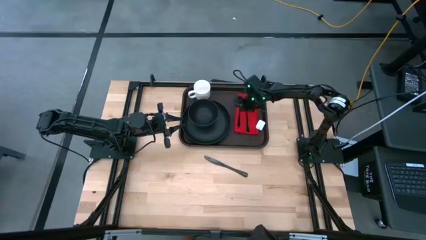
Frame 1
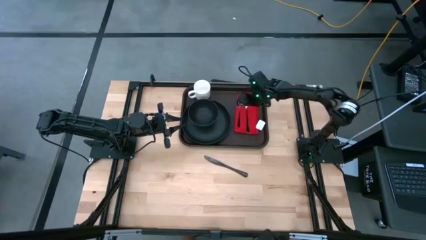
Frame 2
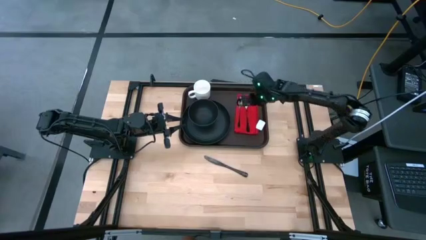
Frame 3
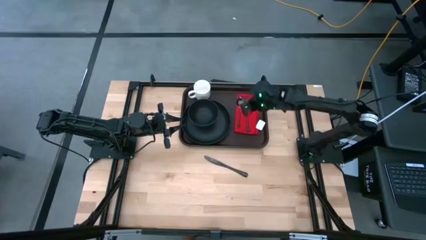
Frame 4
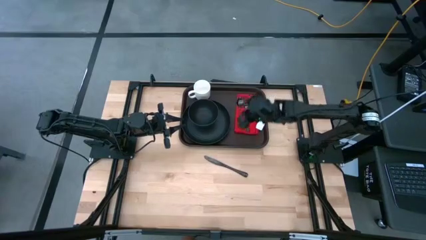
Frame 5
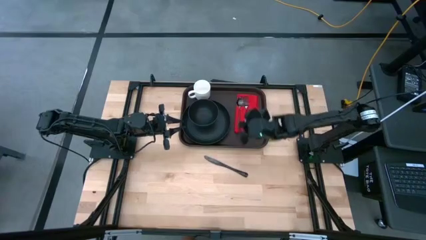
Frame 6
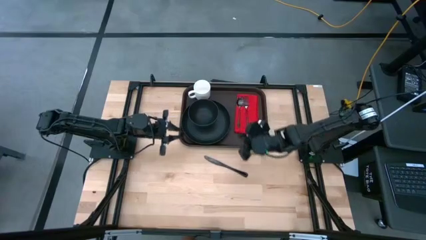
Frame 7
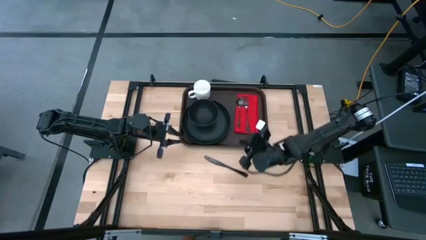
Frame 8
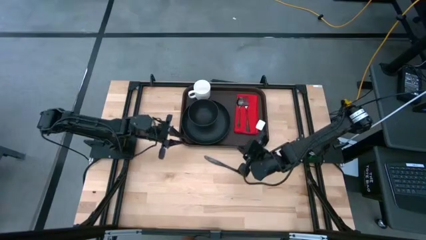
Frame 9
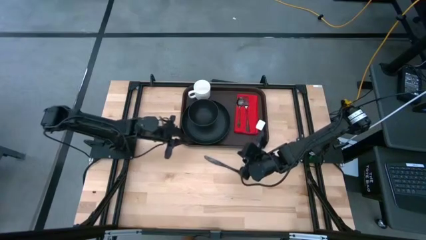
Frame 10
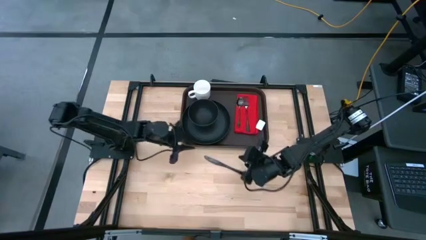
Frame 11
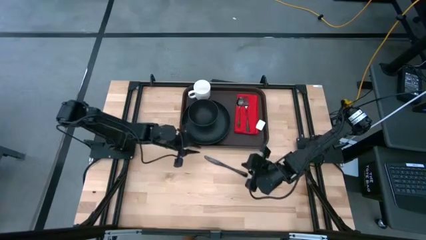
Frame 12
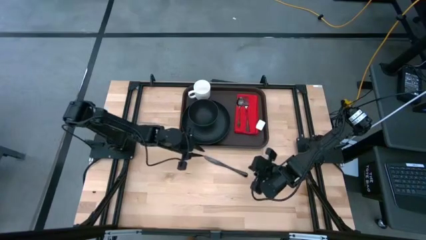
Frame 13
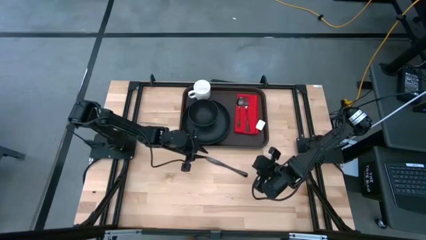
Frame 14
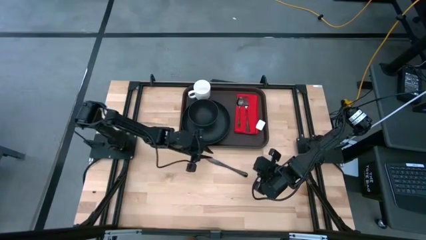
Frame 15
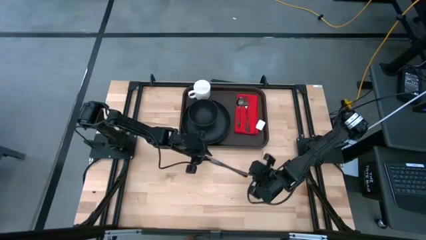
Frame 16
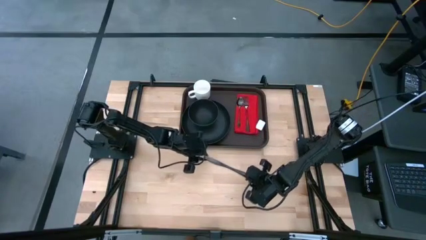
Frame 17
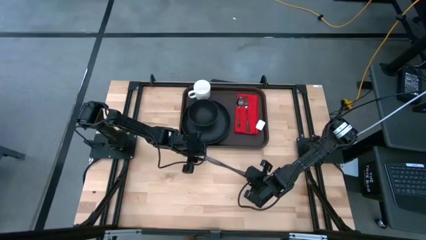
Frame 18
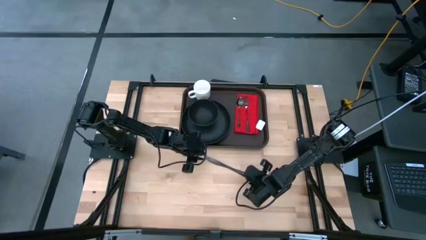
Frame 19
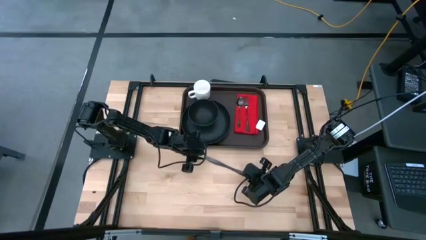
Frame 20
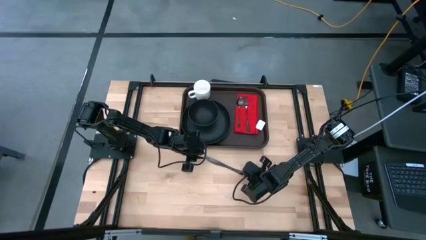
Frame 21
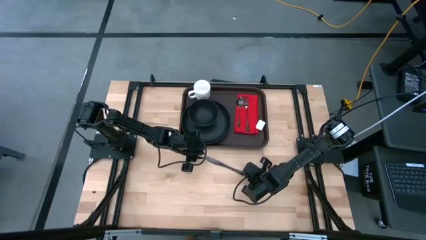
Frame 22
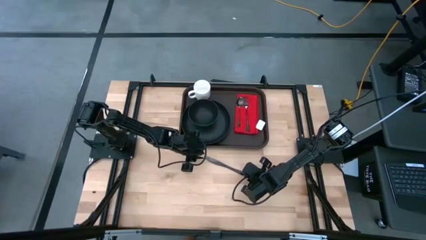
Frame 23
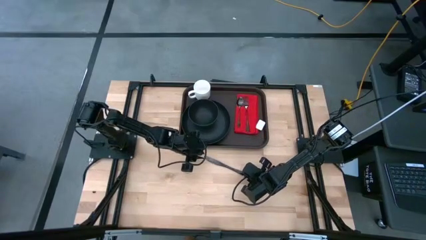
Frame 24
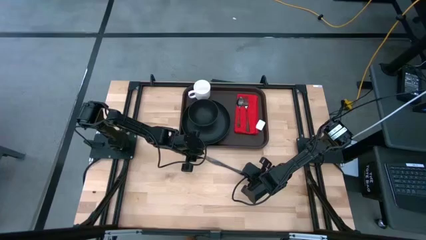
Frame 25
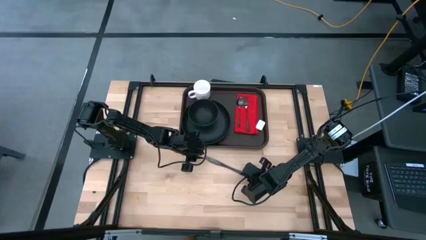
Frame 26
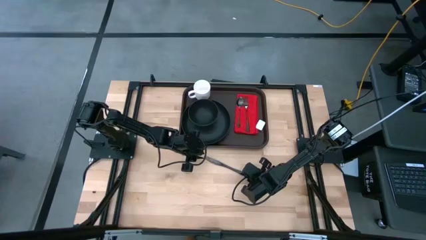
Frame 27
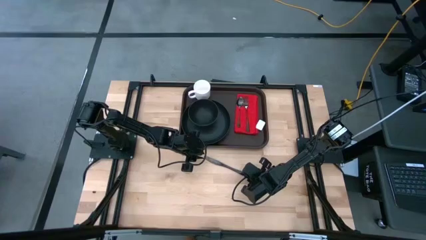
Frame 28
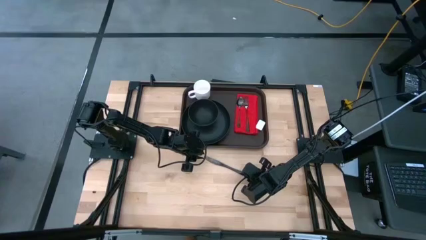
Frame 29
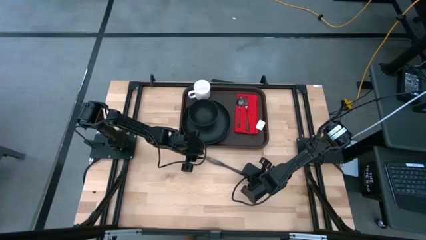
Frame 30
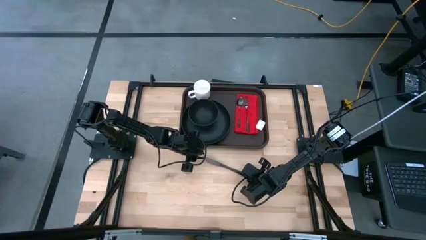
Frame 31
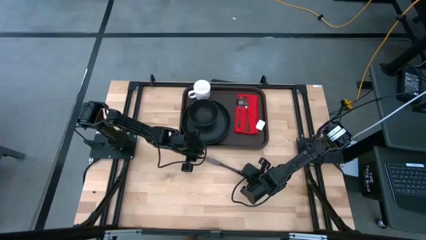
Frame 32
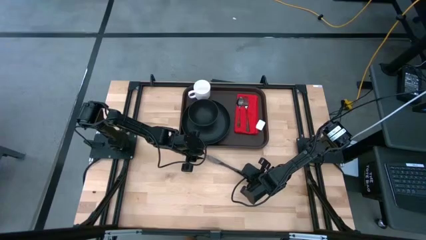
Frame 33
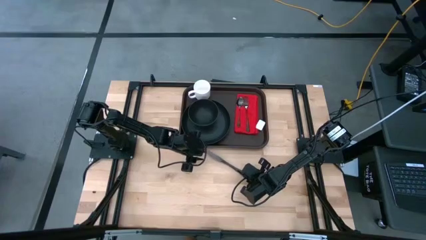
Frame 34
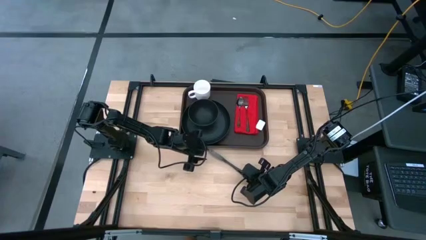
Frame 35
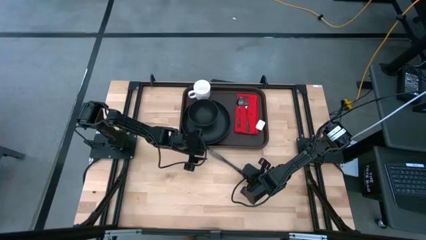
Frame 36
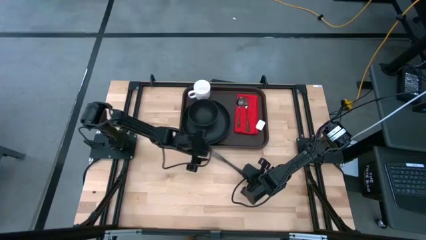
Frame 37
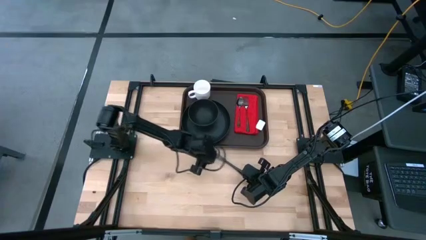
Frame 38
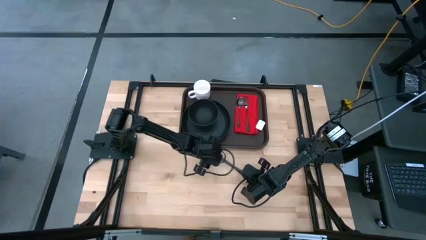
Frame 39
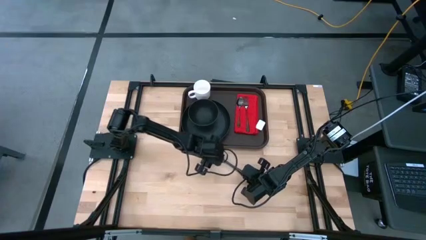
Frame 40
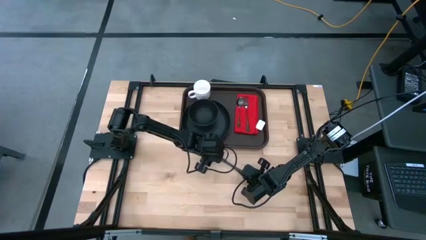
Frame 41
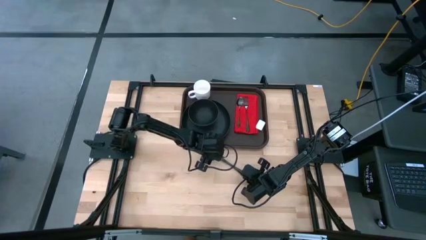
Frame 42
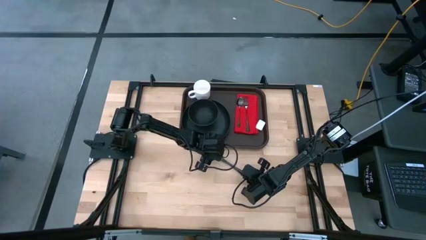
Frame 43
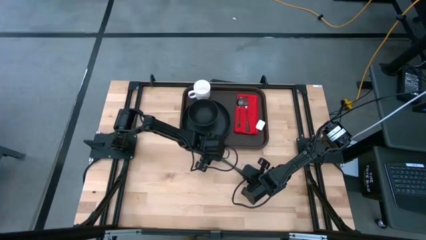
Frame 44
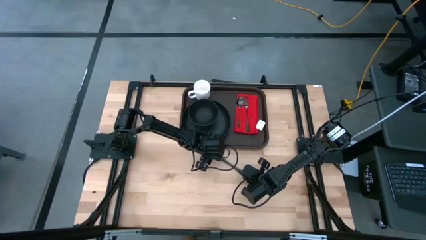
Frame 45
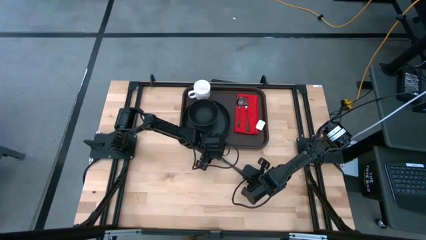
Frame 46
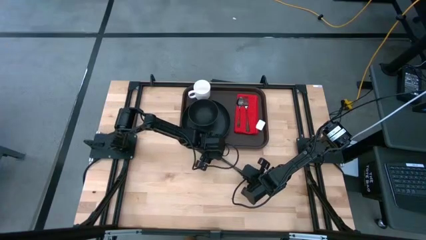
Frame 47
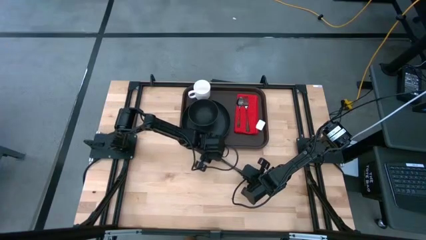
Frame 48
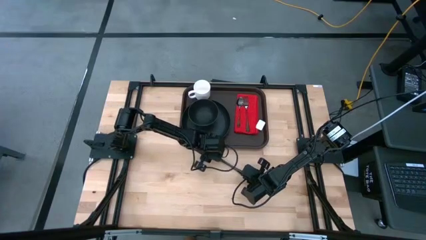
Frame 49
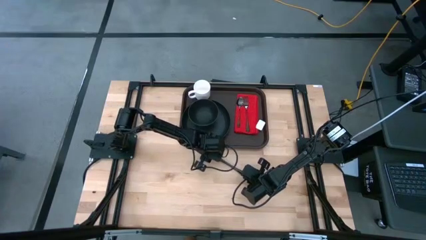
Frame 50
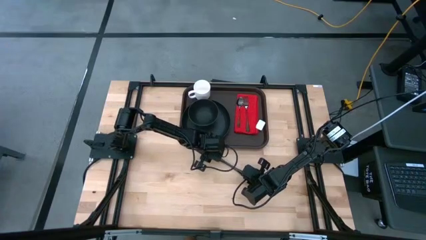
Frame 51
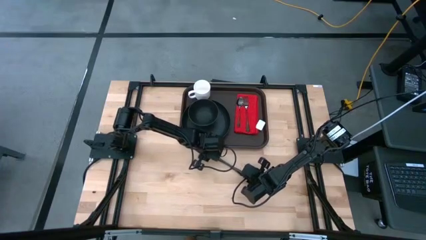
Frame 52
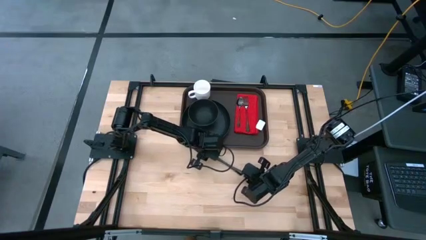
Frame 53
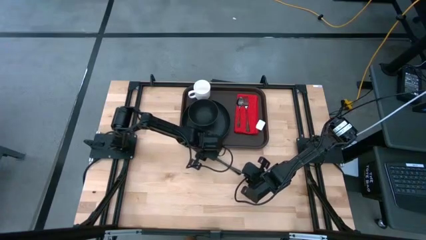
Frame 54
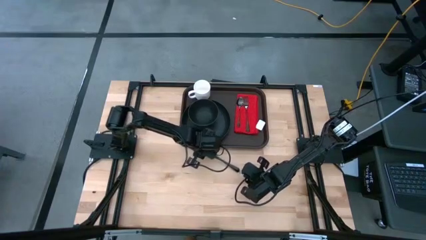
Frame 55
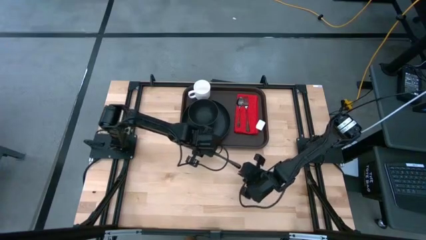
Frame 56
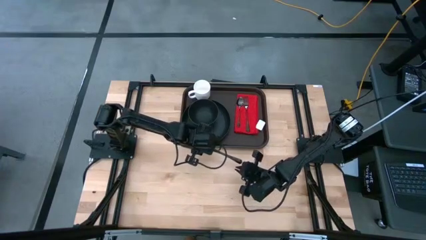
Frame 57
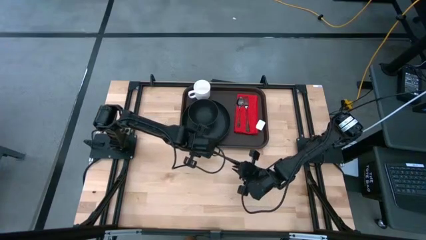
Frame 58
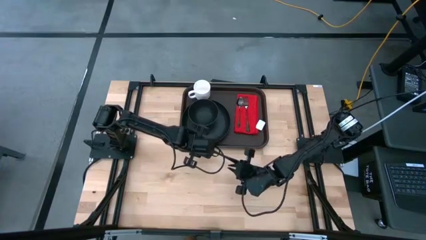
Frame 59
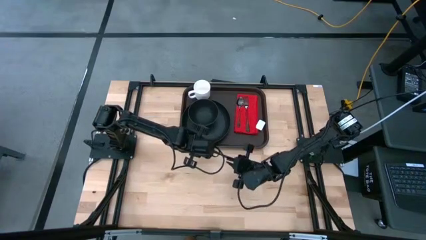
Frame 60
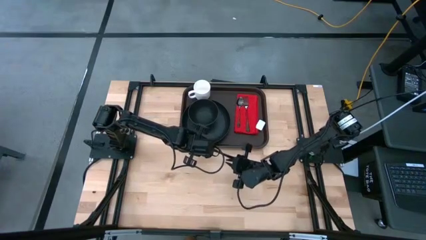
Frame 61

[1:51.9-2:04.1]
Task: Set up tray
Put the black dinner knife on top of the red napkin on the right side of the fork
